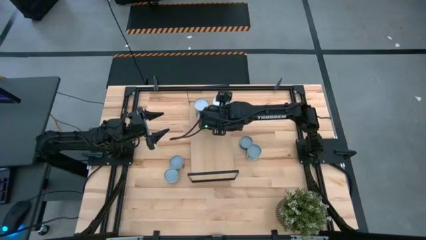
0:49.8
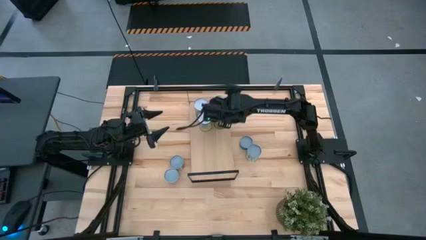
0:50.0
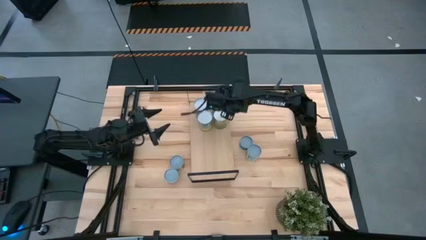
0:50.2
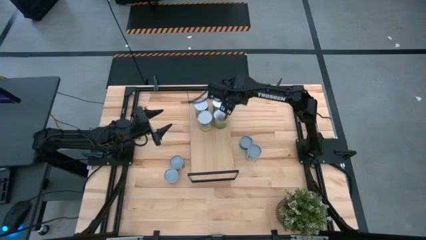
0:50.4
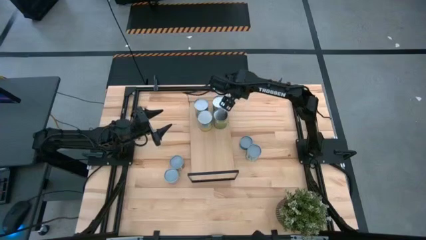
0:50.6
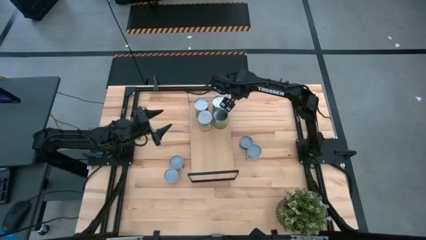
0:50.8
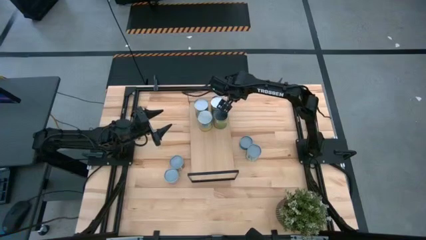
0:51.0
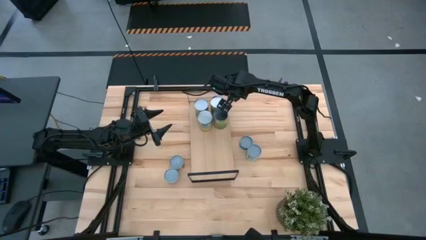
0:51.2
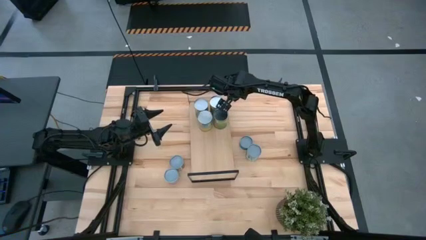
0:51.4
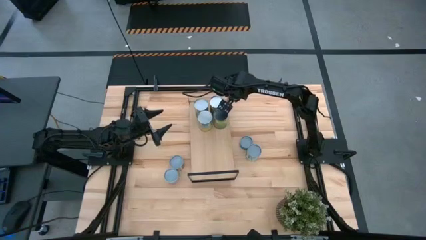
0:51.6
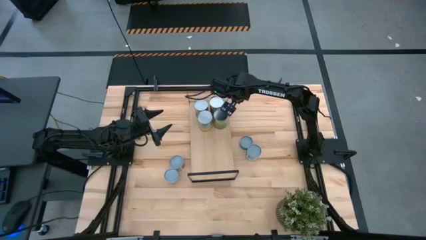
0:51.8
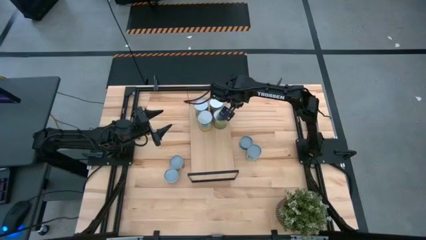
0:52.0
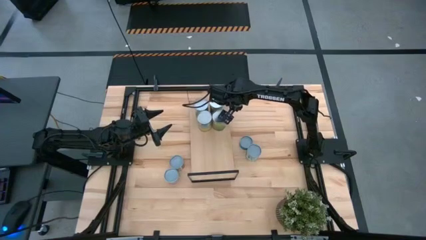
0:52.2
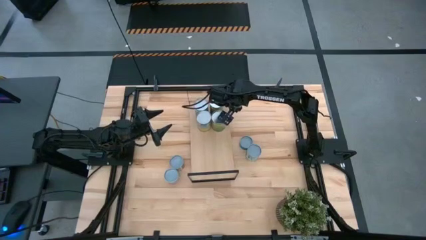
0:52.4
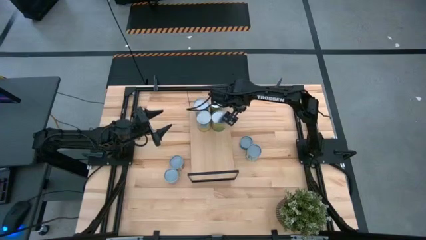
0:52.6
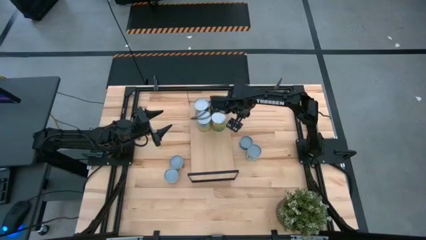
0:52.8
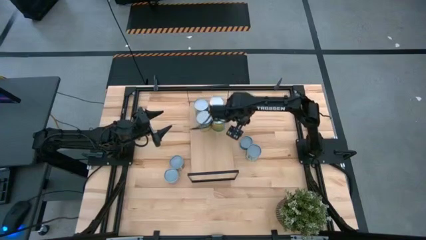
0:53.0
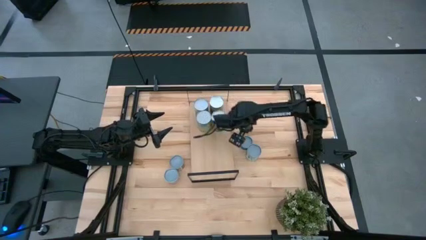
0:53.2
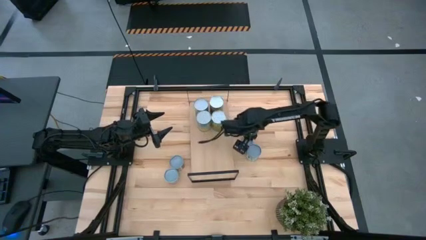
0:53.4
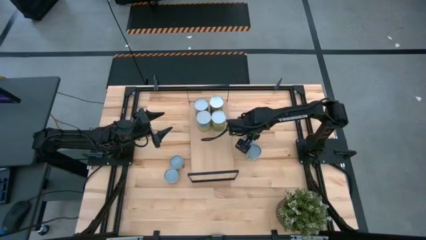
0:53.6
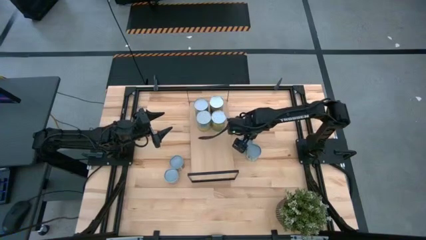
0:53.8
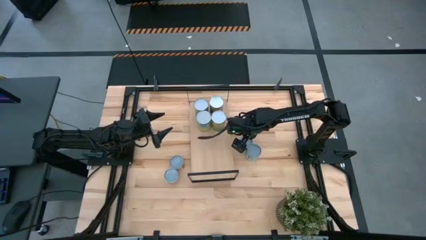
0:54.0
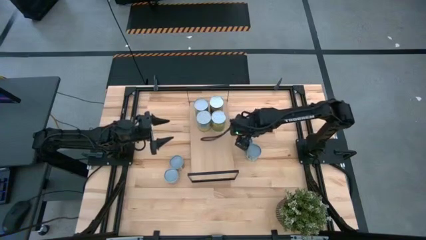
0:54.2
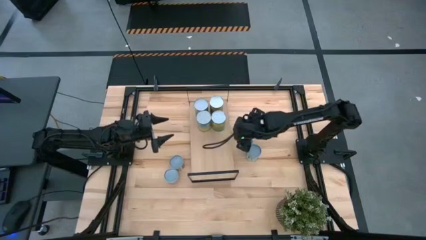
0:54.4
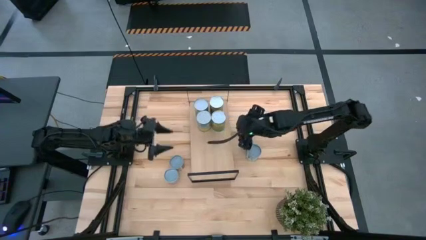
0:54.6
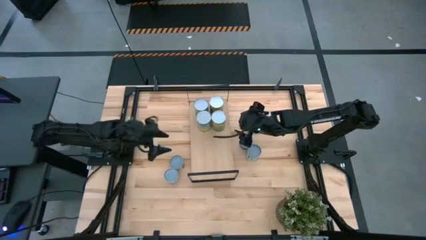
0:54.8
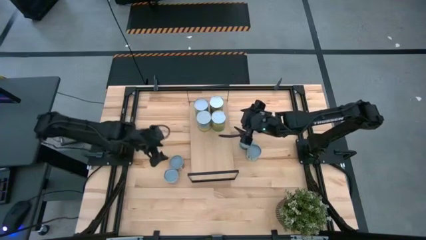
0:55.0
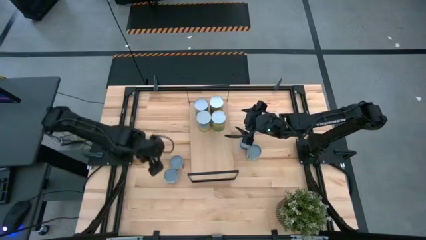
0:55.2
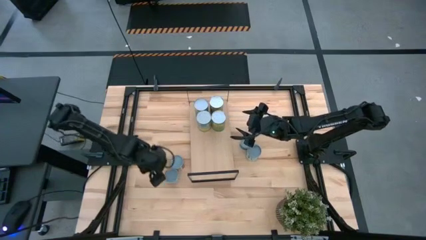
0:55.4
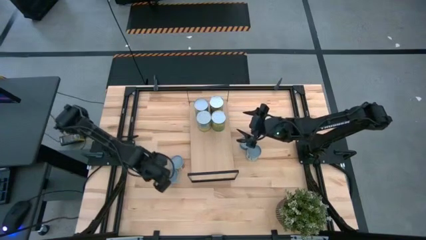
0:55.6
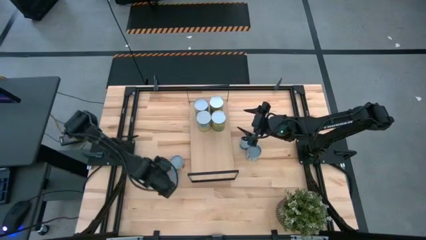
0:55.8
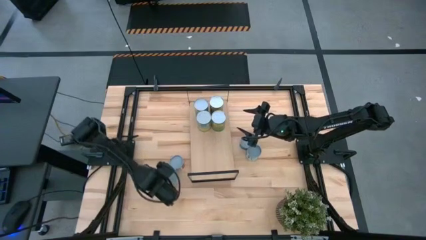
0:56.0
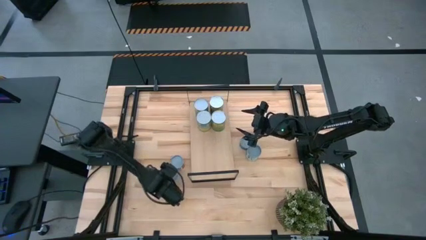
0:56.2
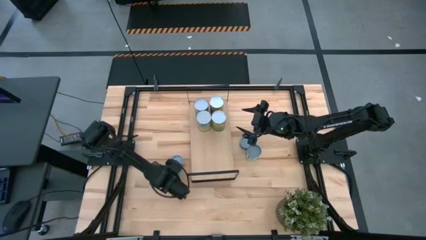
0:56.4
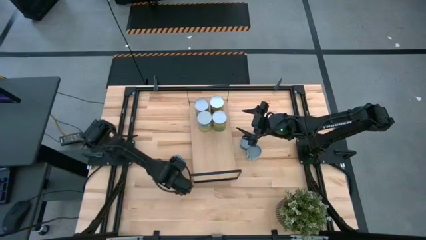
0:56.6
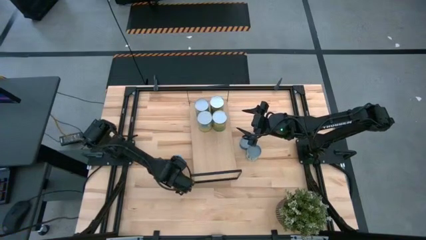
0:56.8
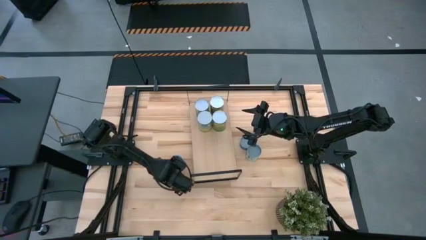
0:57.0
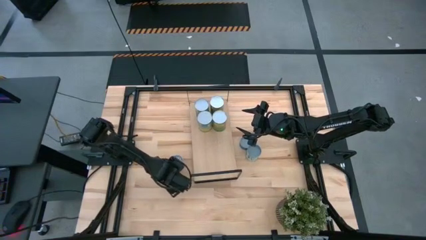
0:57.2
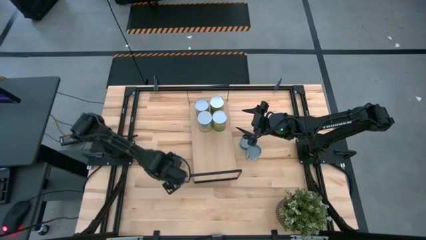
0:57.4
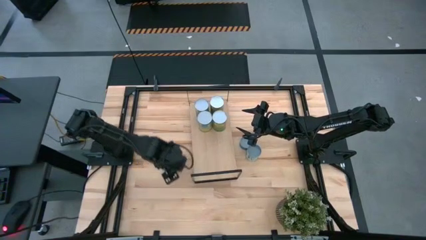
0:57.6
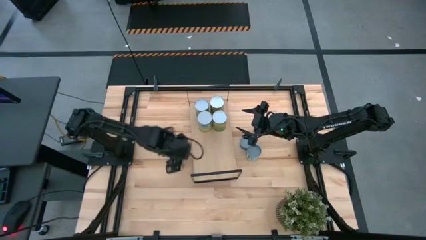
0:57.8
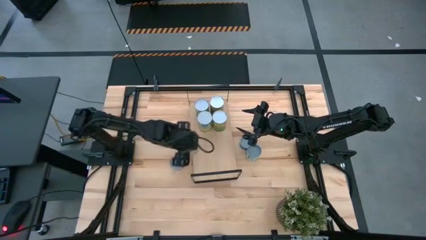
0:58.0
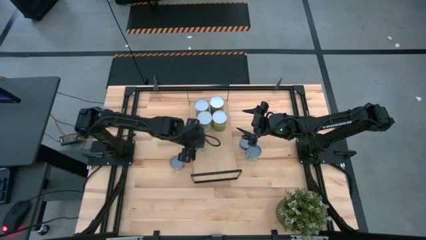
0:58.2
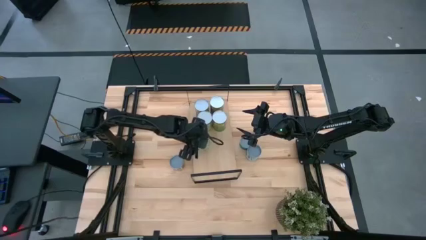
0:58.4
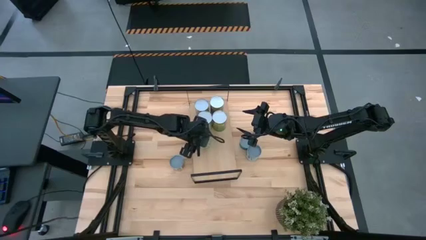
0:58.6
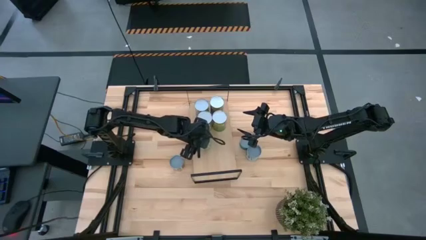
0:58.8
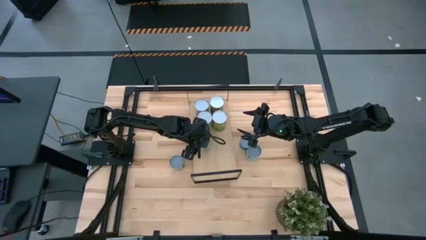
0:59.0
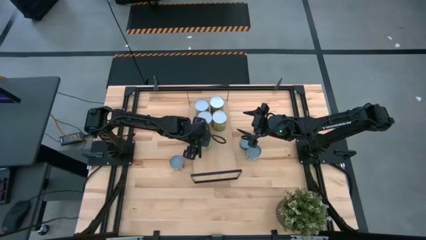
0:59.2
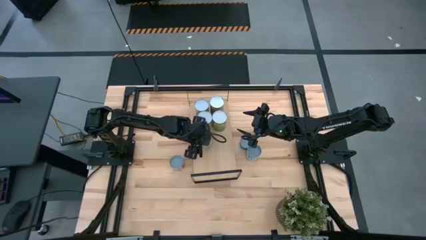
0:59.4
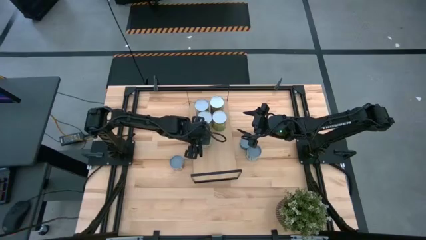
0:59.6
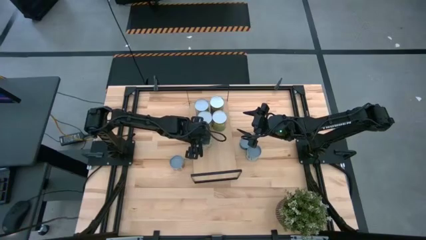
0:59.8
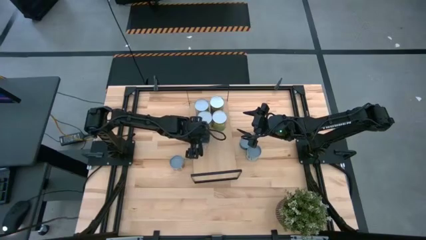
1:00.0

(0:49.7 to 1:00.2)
Task: Pick and place cans onto a shelf
Put the canned green peas on the shelf

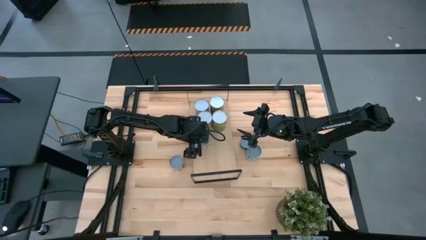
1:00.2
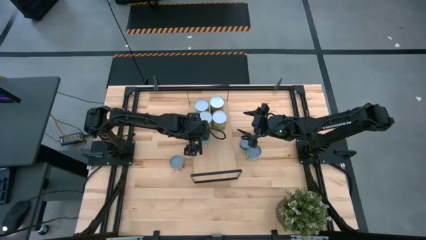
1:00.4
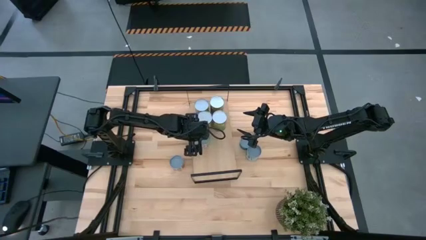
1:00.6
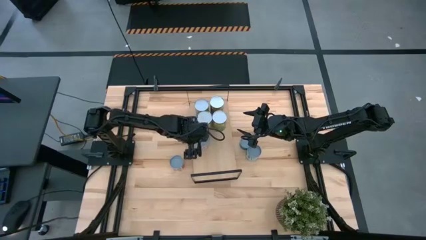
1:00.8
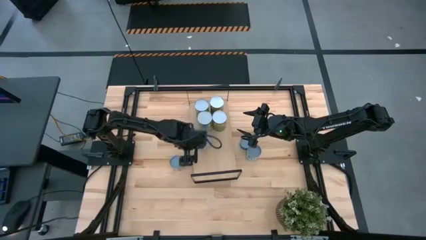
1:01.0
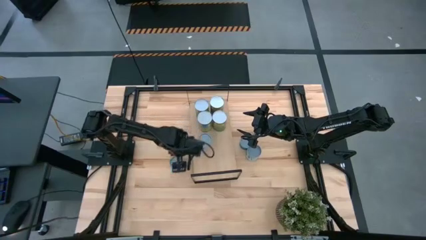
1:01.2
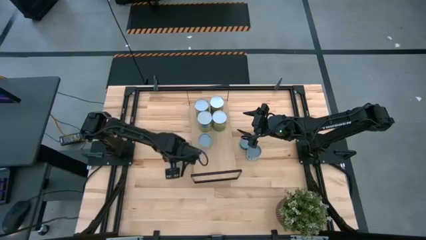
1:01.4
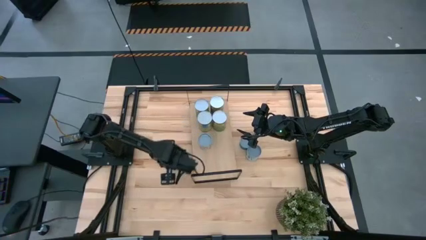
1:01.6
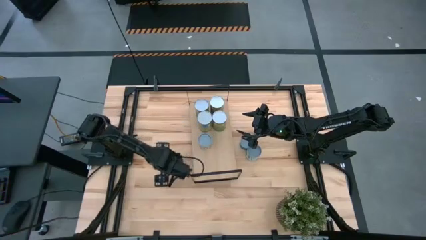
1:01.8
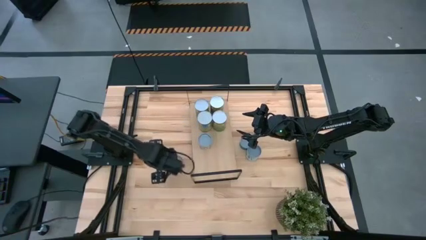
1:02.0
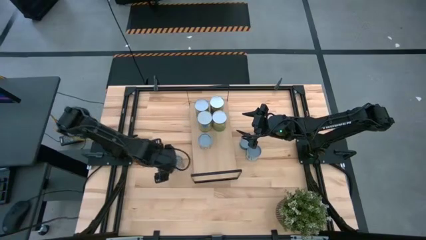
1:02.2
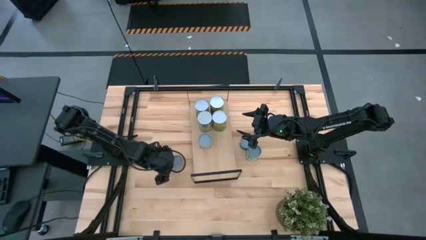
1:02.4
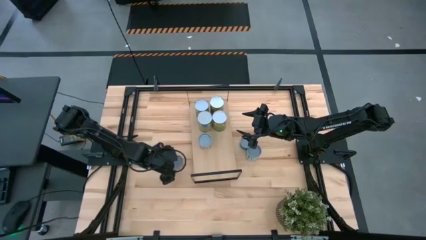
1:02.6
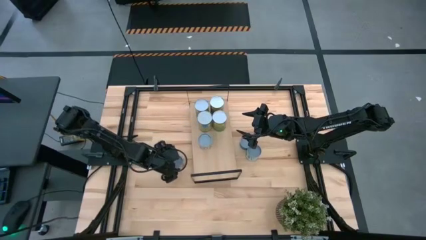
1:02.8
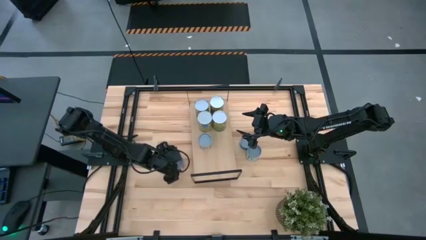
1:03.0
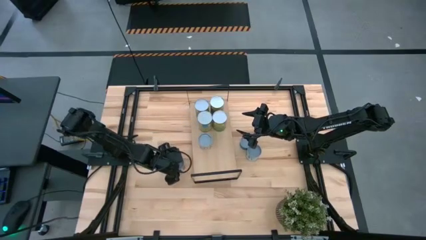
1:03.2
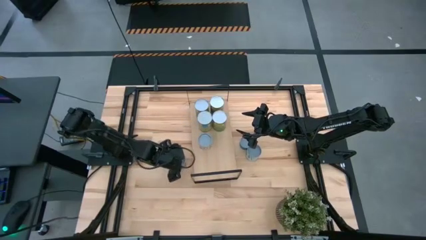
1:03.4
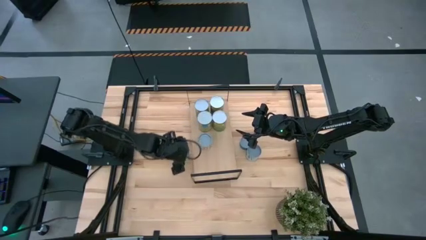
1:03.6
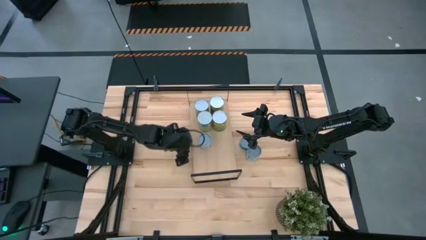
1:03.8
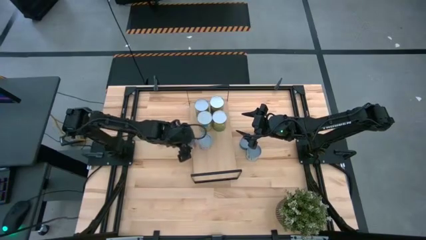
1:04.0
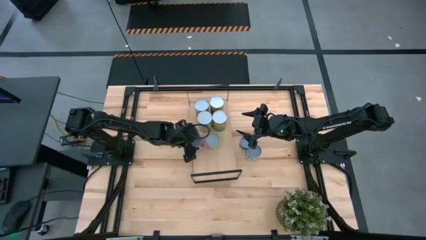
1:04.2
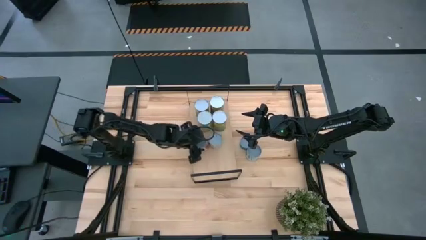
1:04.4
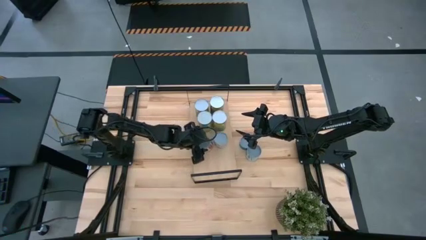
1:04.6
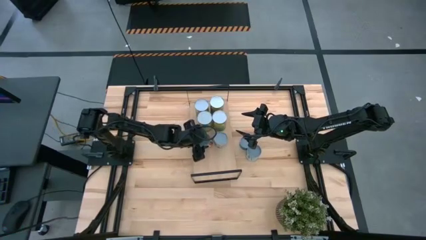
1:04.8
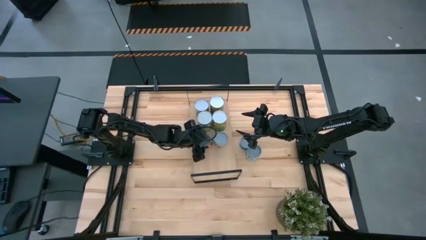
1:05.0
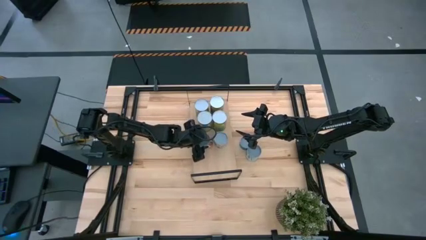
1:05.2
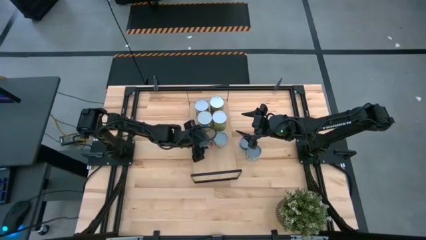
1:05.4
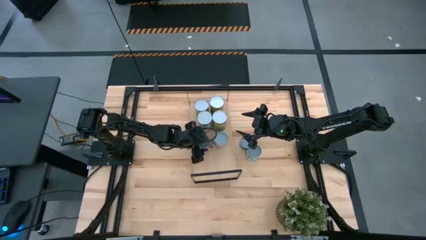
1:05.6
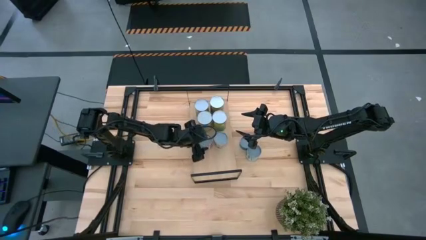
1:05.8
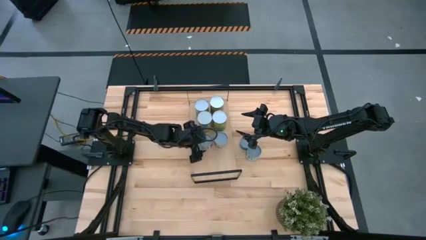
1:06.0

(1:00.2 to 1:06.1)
Put the canned diced tomatoes on the shelf
